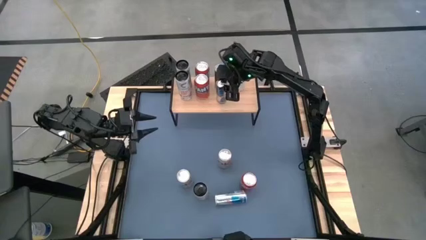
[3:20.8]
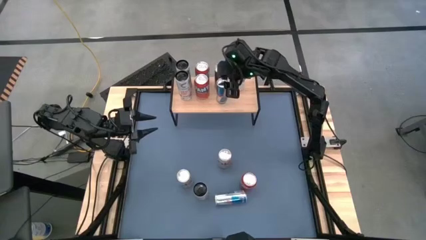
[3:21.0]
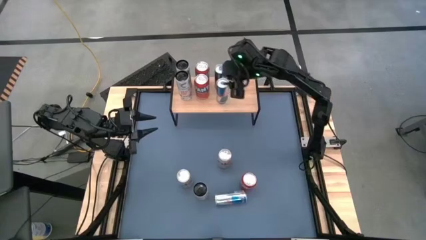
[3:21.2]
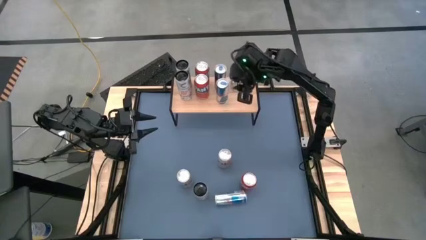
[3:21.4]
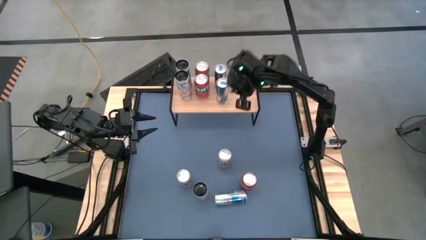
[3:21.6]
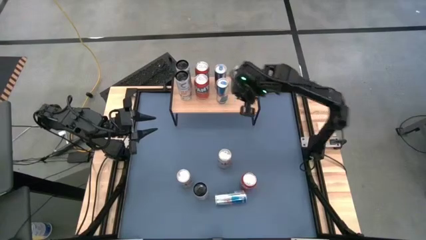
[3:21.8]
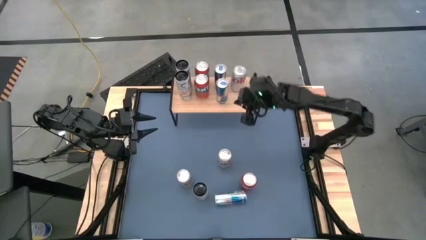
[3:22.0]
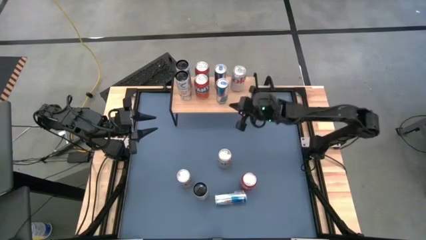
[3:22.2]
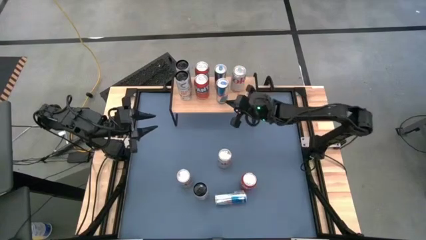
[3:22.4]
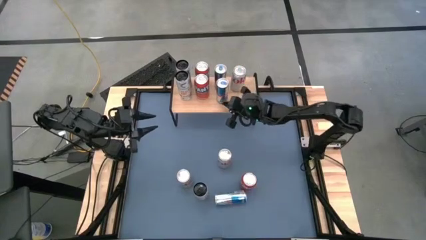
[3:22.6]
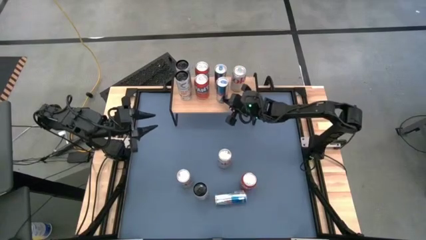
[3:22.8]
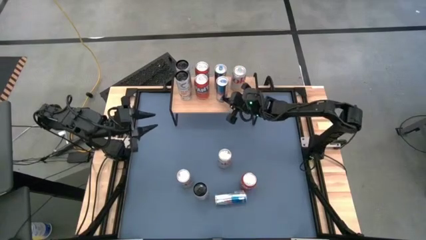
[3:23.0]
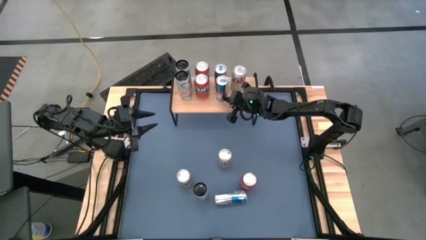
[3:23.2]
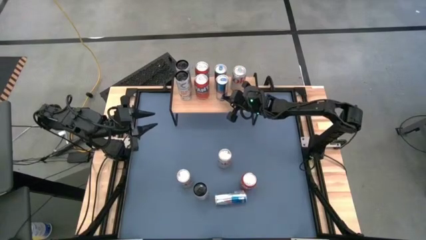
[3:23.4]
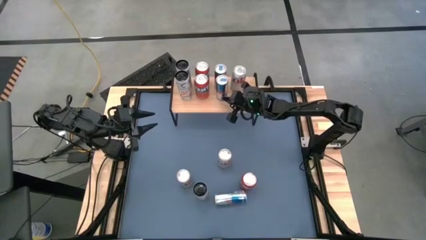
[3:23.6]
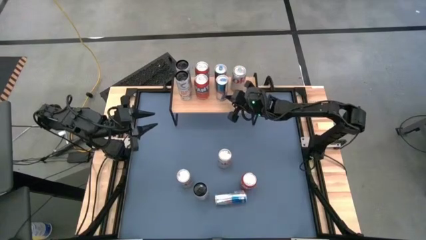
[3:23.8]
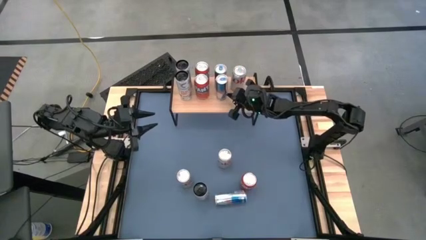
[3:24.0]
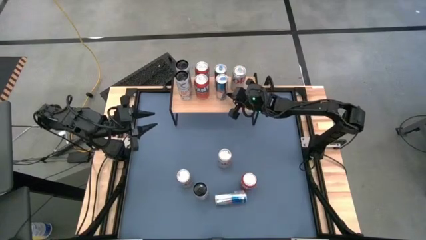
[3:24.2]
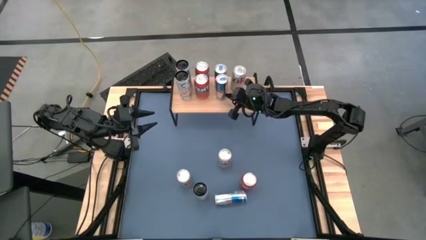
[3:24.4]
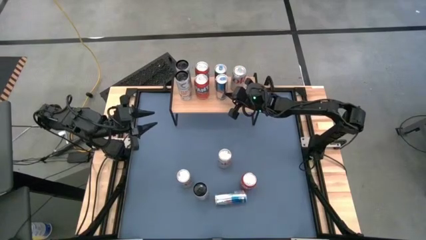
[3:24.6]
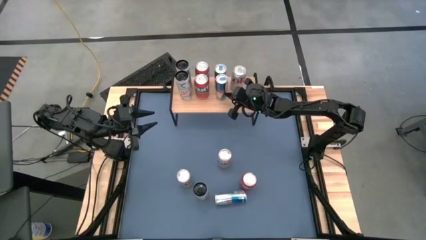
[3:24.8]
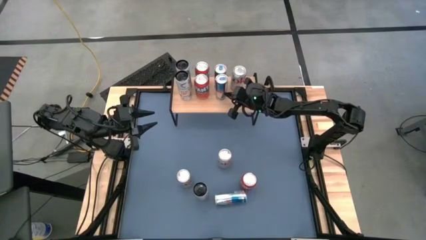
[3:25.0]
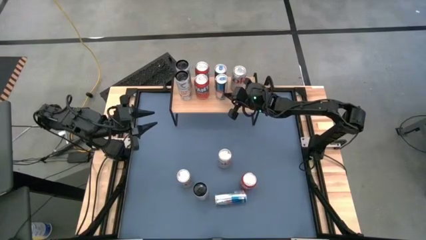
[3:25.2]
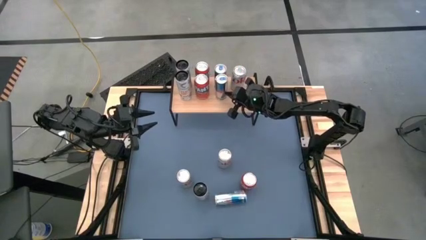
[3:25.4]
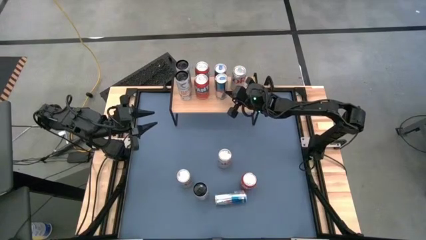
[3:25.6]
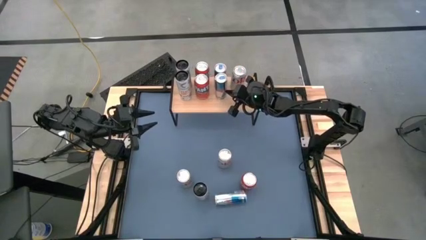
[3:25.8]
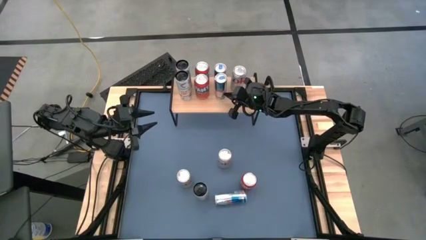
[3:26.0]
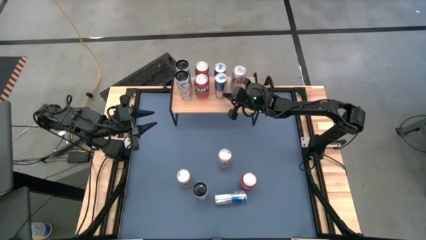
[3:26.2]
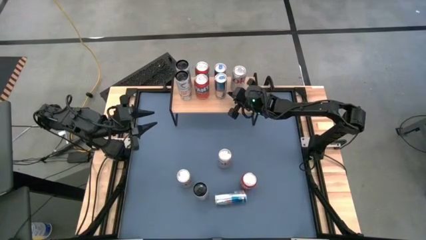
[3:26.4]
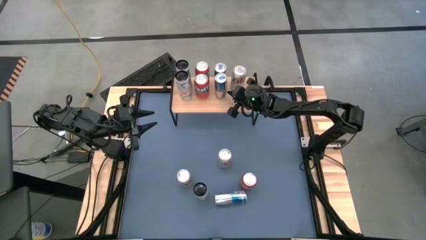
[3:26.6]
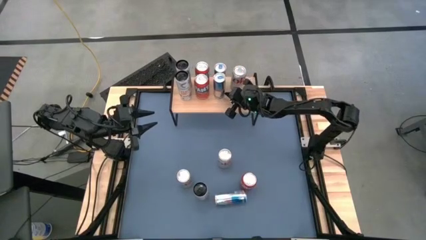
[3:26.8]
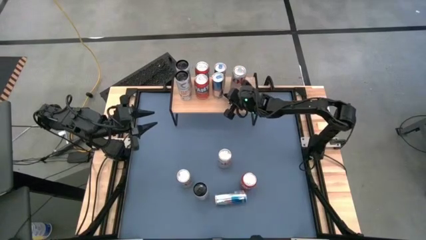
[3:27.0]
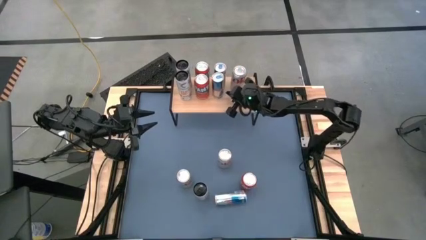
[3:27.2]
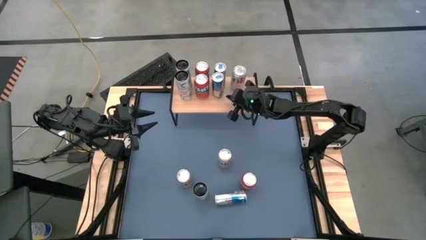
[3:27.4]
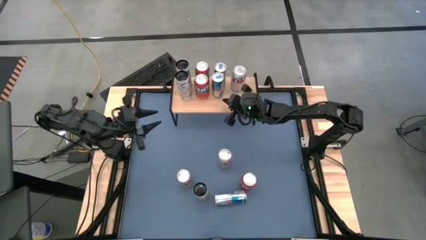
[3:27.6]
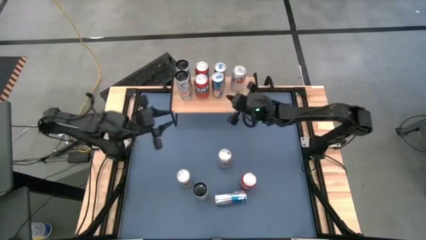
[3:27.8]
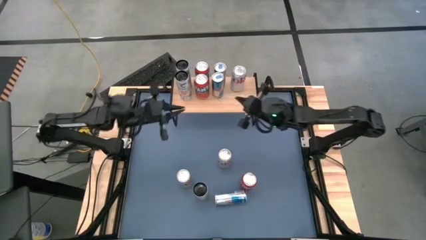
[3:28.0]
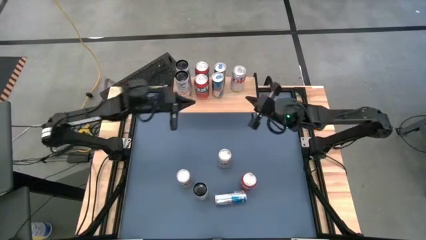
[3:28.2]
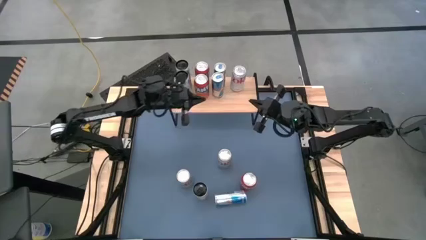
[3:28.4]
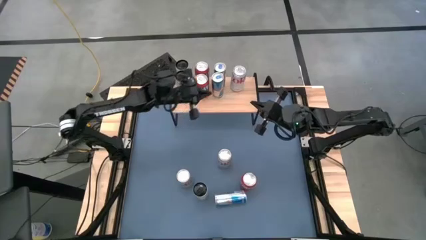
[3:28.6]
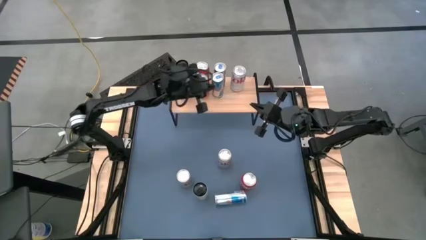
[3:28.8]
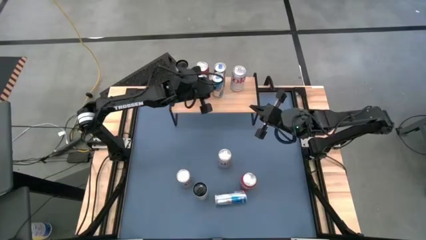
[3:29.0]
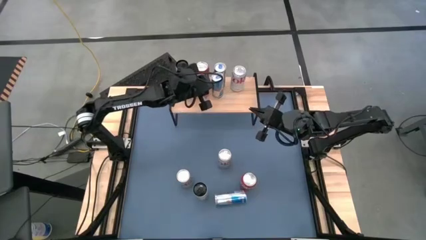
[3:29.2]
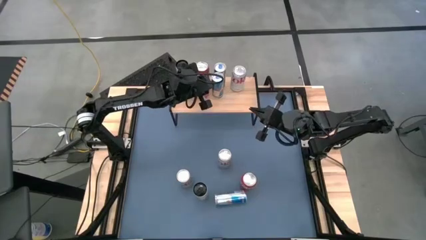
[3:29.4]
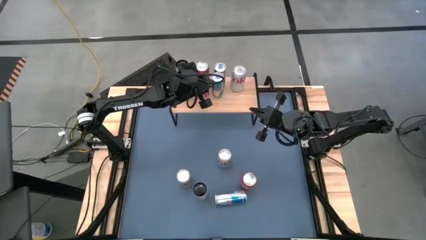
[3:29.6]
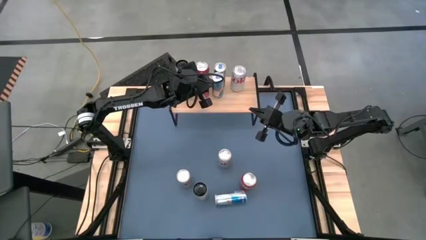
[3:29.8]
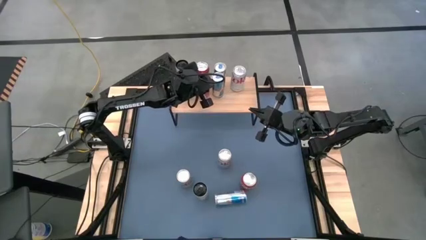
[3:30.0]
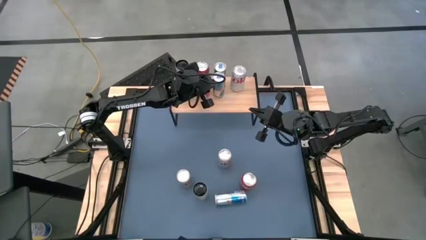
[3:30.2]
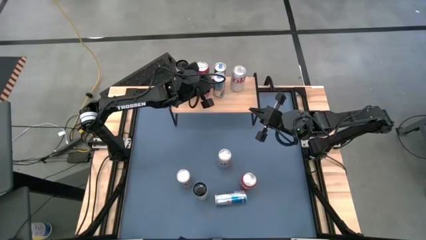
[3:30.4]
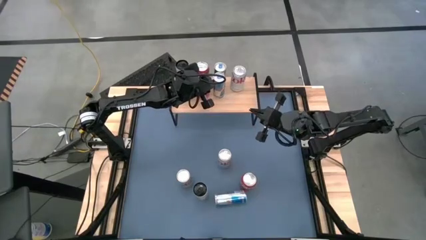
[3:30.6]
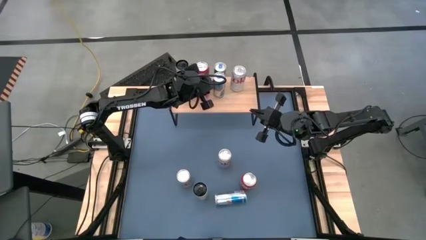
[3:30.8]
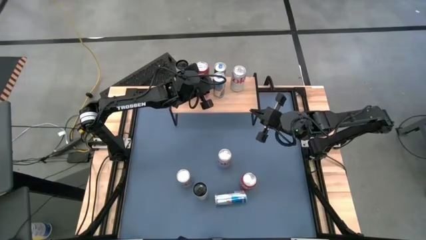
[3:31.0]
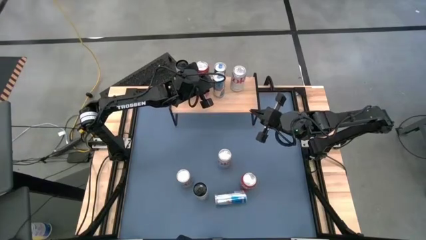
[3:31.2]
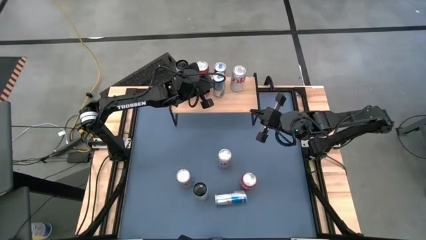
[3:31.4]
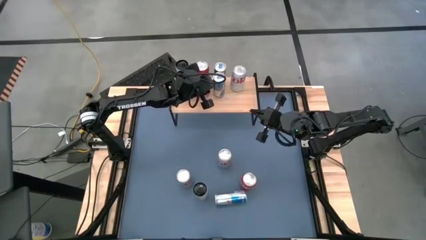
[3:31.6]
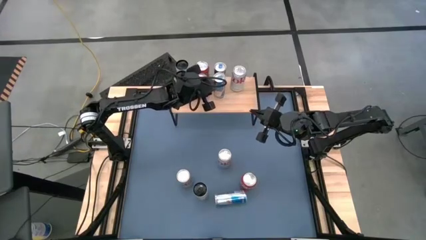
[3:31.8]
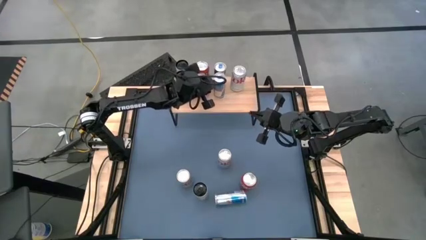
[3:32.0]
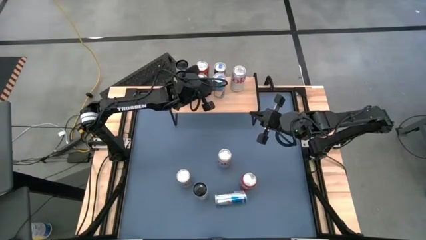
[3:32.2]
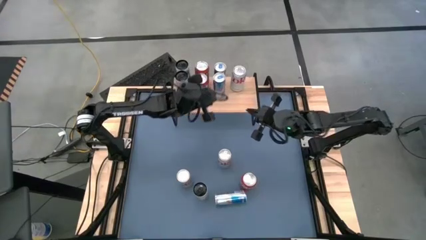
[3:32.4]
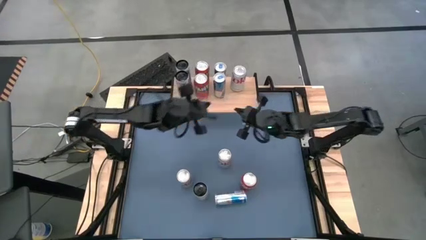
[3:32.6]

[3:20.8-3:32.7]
Task: Place canned beverage on shelf
Adjust the blue soda can

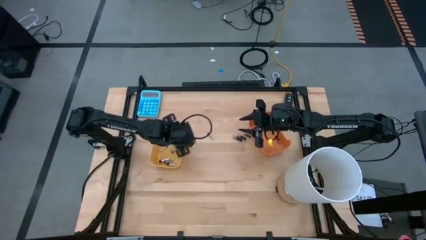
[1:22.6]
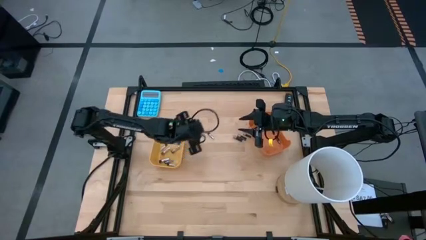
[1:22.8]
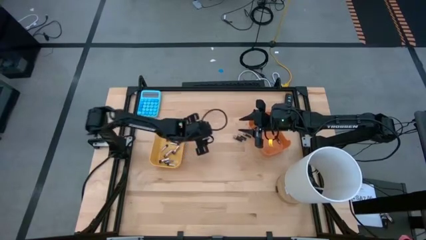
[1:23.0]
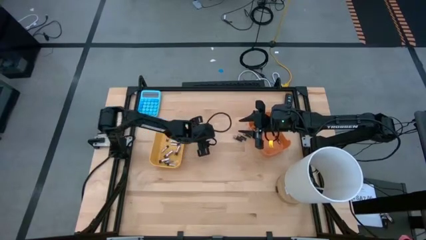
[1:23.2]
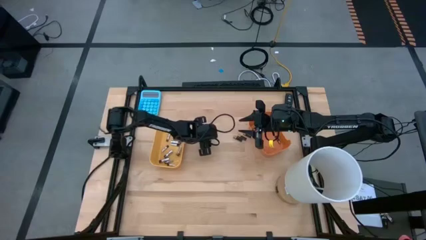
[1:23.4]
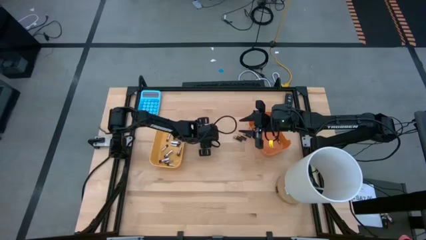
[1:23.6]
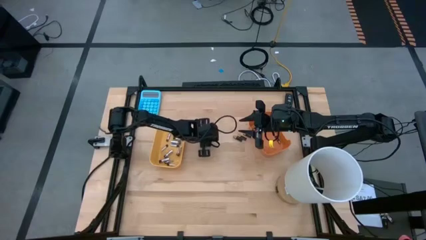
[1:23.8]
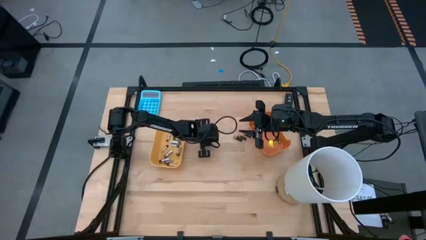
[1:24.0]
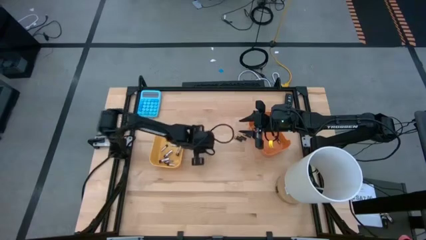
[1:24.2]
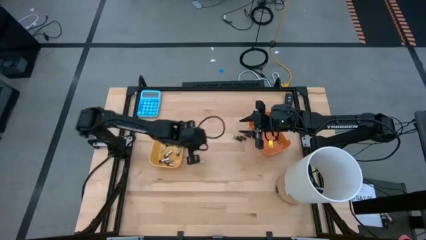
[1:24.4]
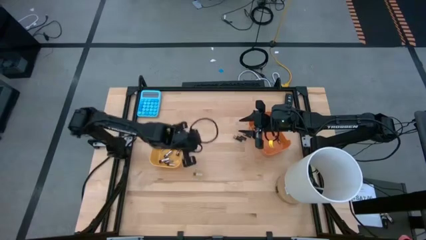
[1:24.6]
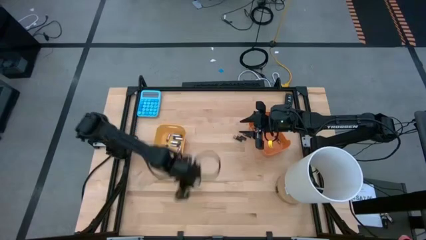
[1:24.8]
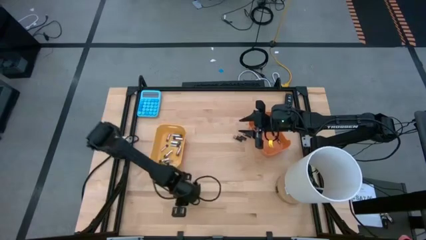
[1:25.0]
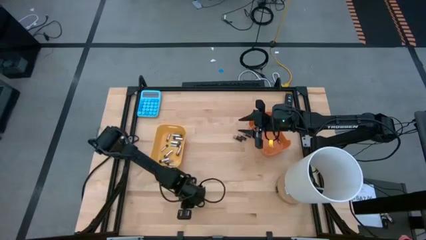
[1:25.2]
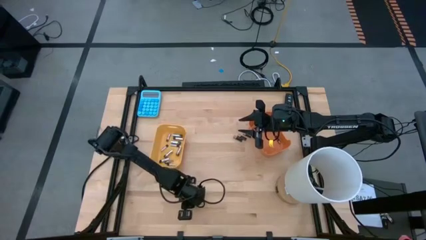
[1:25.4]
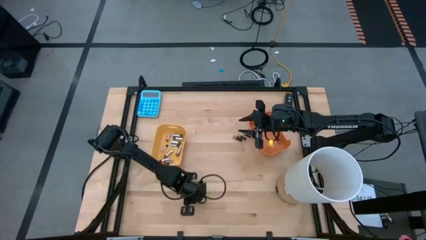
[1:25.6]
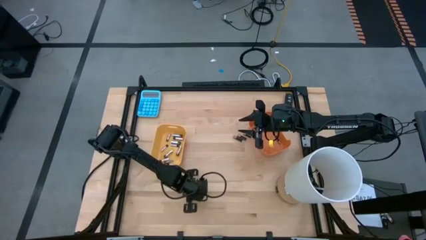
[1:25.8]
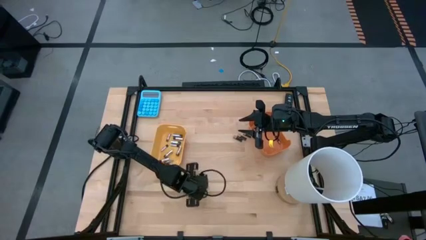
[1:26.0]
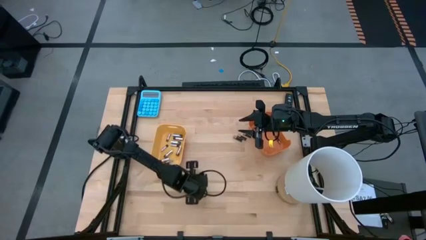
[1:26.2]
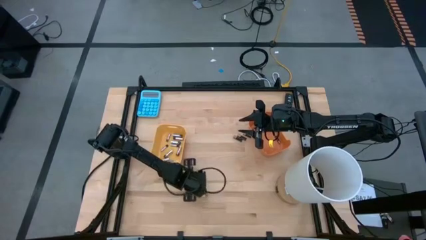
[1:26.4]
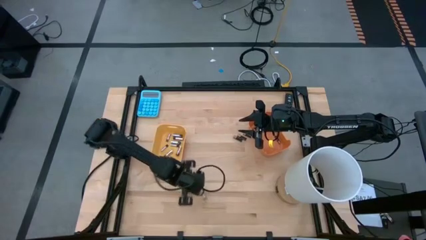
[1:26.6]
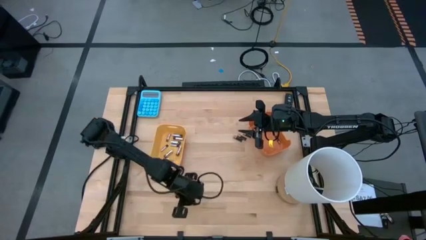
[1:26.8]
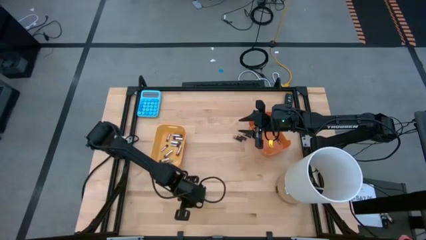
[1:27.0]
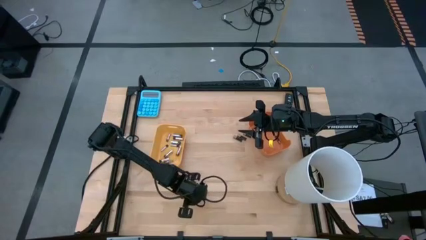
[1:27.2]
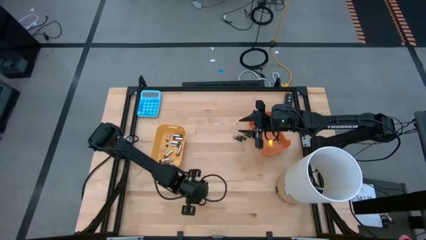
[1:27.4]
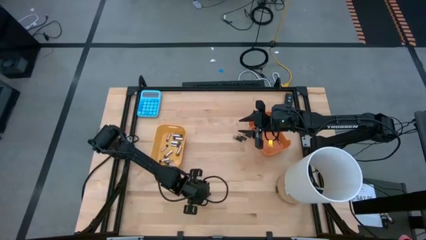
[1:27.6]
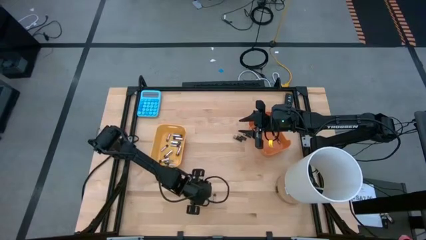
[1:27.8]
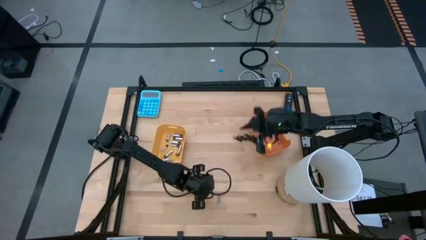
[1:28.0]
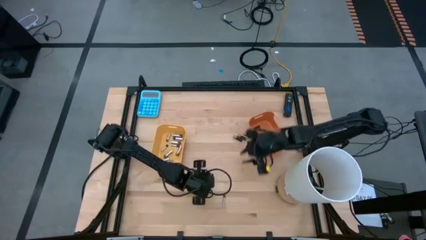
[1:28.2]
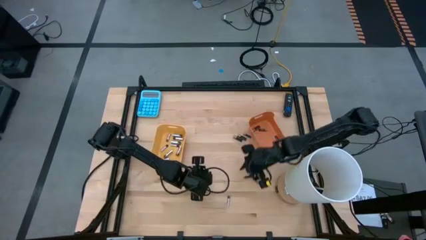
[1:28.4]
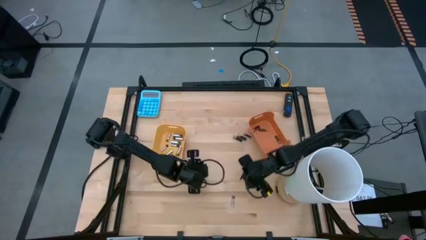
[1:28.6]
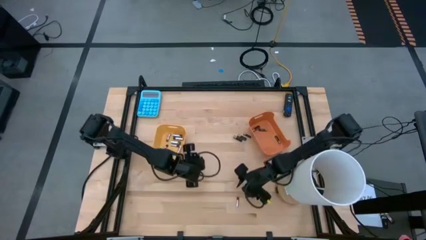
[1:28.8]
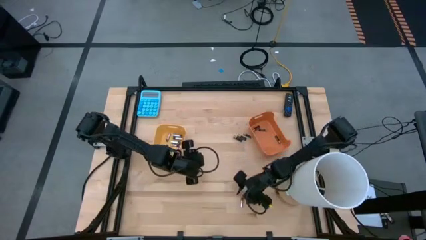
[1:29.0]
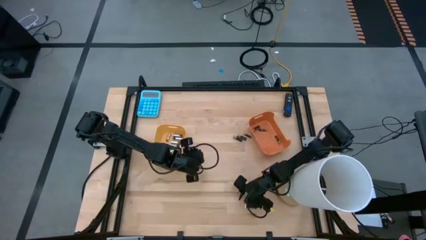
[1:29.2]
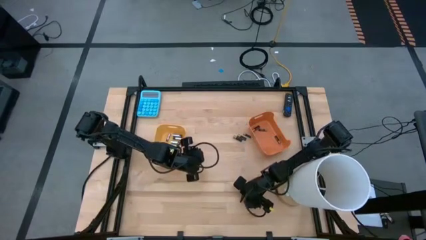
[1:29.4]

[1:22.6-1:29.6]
Task: Sort batteries
Put the silver battery into the yellow bin
